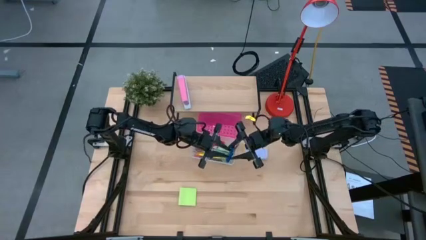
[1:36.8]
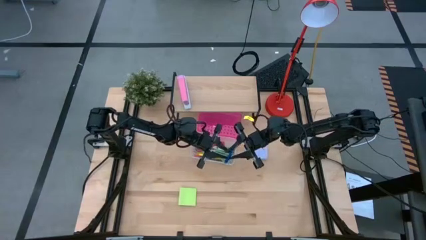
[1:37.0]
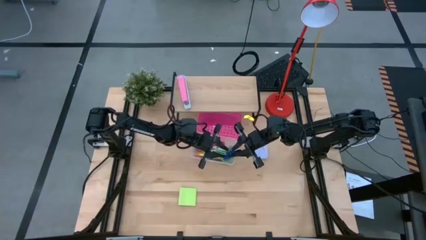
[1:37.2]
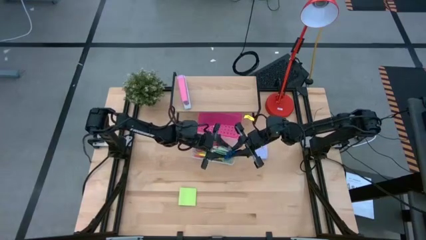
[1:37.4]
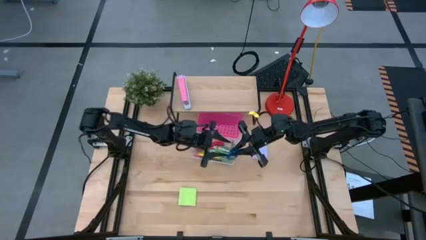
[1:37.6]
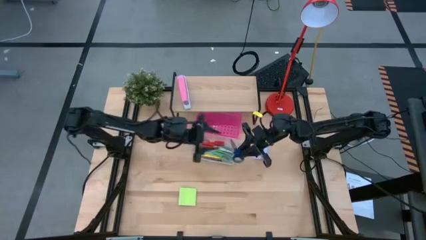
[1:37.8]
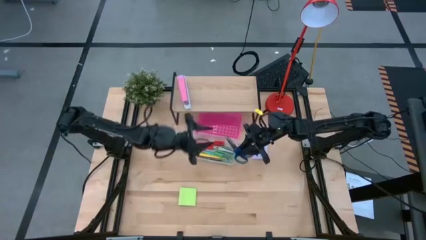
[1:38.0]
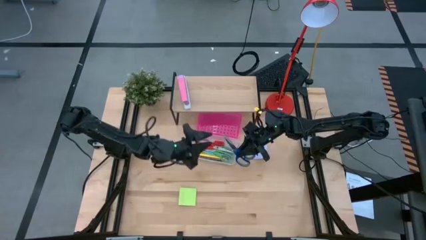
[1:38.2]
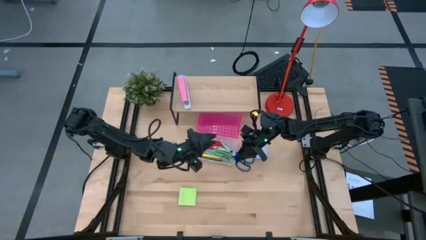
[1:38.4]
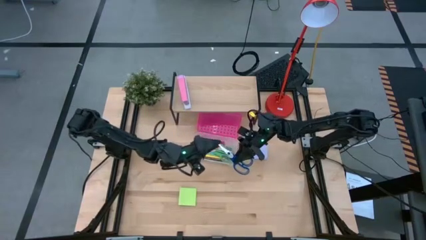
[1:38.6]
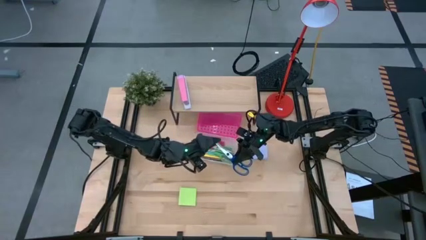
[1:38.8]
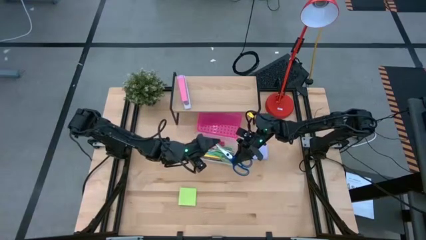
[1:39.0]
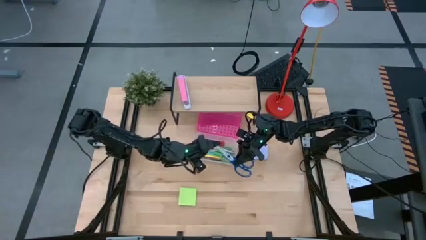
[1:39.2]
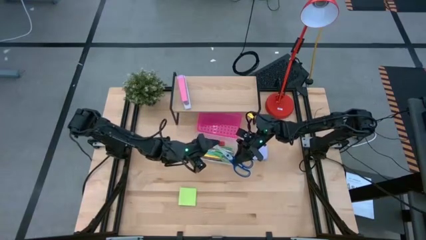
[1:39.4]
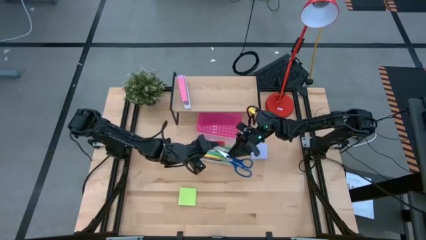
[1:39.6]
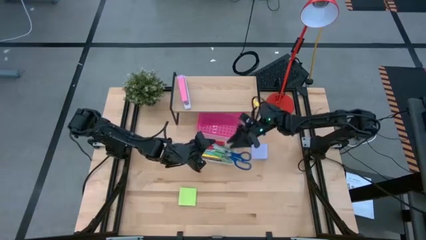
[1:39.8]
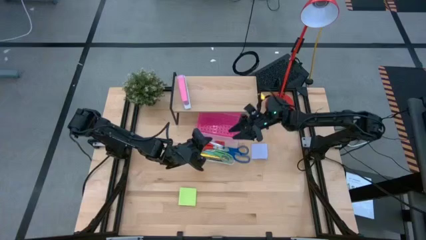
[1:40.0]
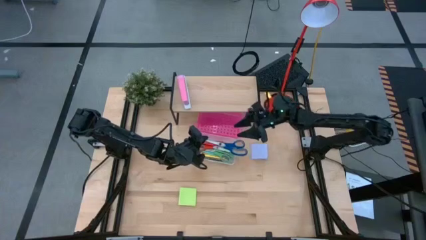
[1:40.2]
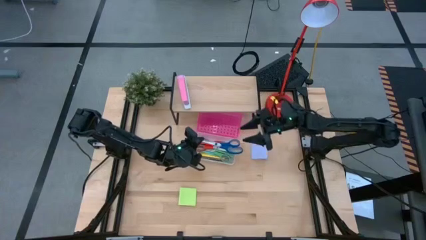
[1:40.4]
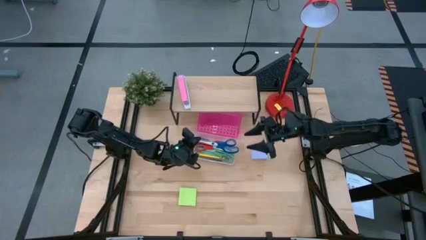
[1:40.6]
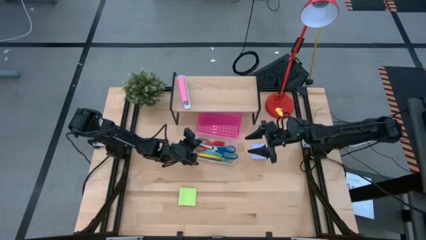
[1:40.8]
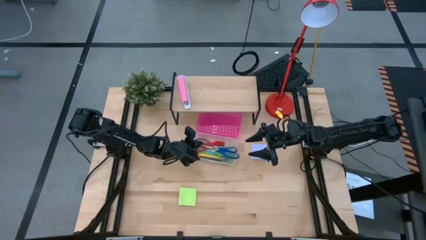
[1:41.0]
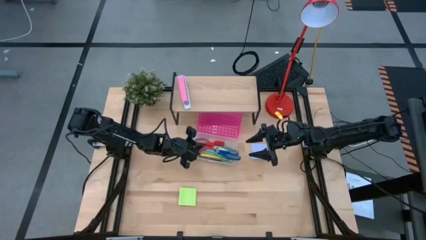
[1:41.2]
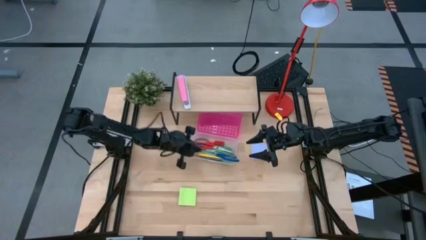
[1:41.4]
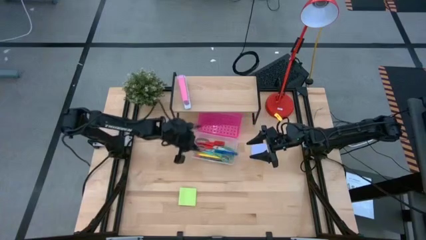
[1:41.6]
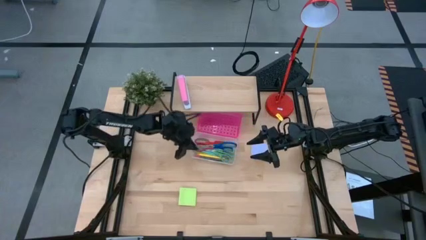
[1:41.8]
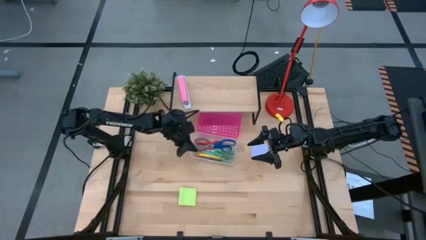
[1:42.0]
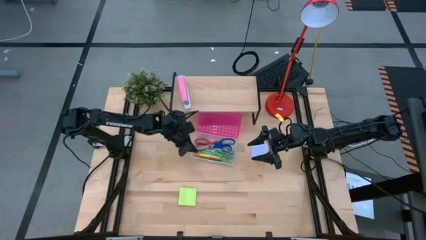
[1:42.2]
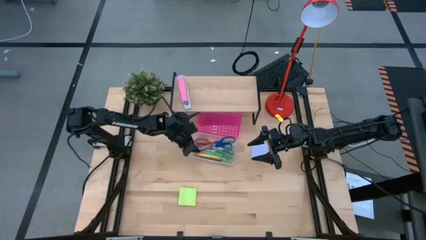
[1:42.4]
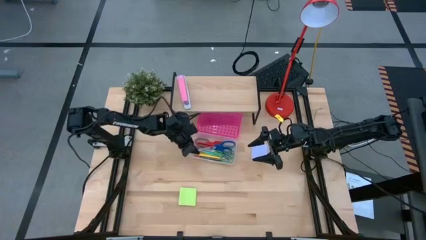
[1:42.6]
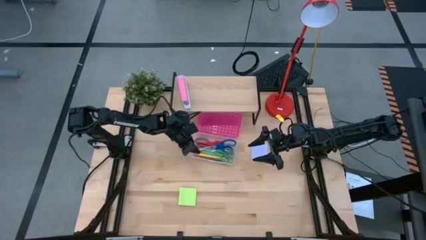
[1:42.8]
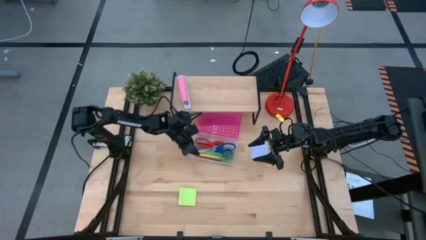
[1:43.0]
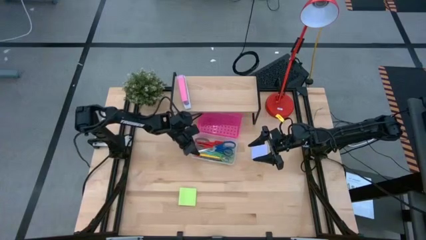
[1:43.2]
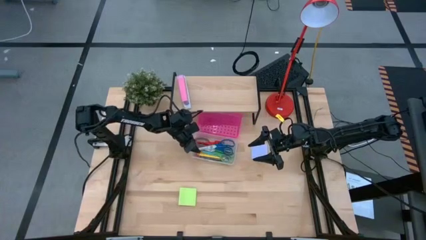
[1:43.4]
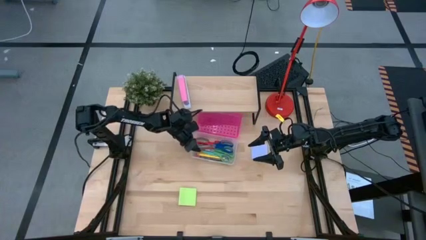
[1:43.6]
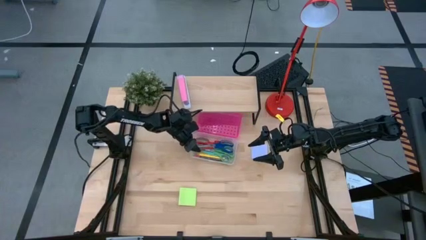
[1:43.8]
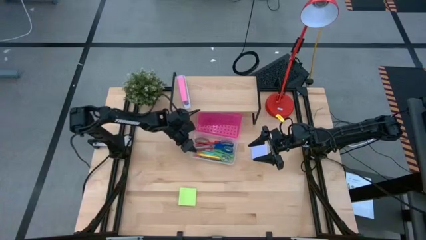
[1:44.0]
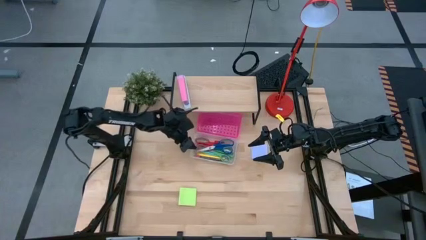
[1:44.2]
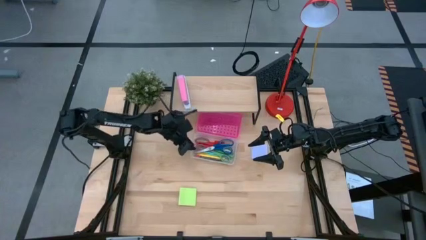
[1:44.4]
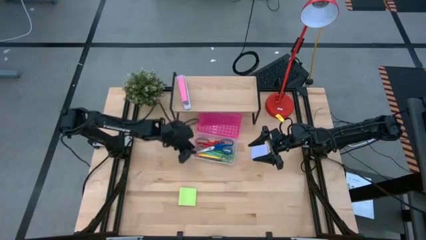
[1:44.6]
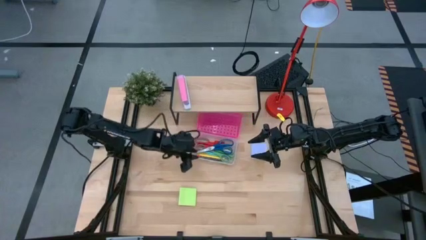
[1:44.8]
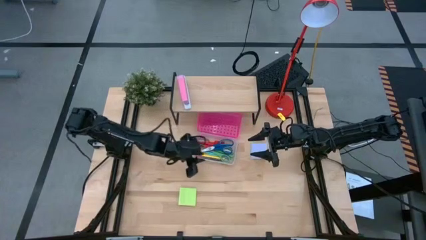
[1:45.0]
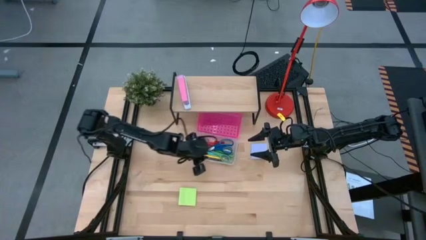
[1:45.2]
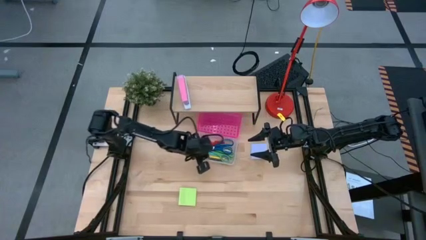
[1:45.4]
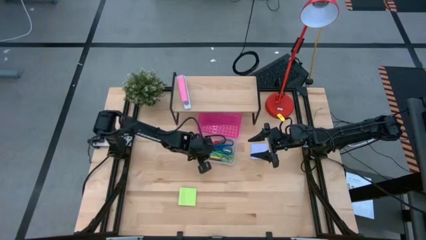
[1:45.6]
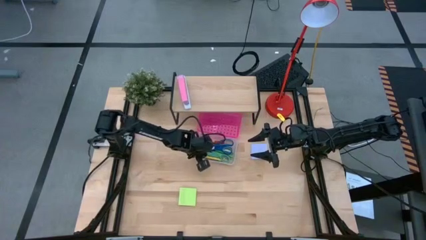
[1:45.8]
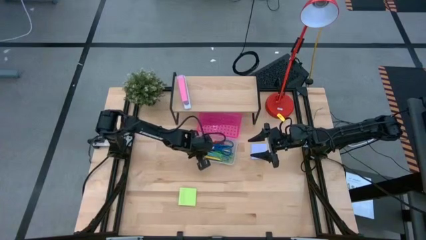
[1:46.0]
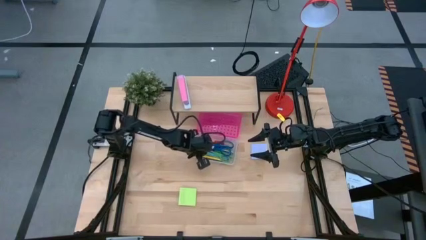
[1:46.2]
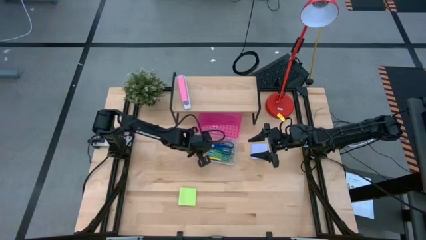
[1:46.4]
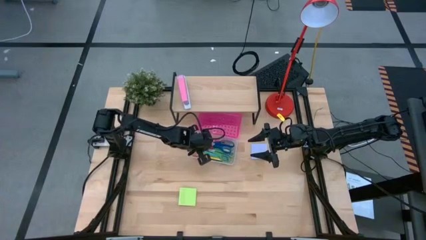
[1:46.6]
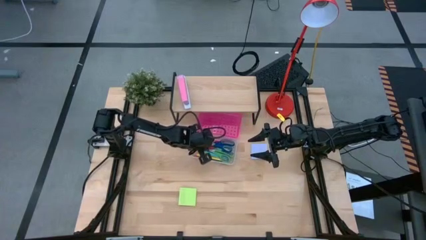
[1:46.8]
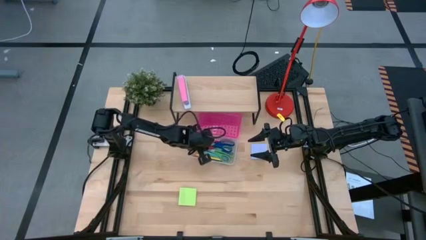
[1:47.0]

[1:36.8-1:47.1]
Task: Pack school essentials
Put the blue scissors into the supply box

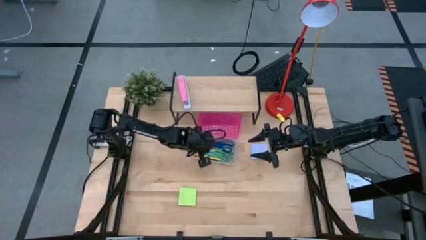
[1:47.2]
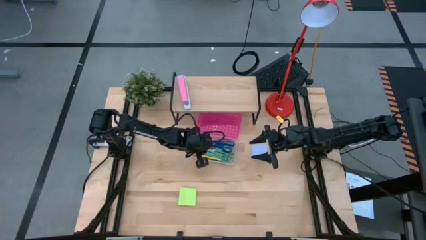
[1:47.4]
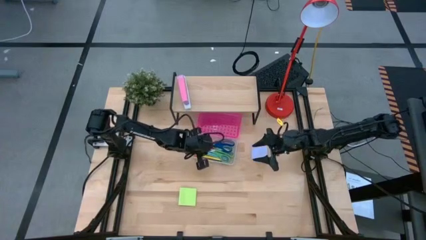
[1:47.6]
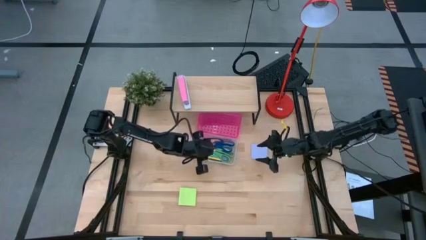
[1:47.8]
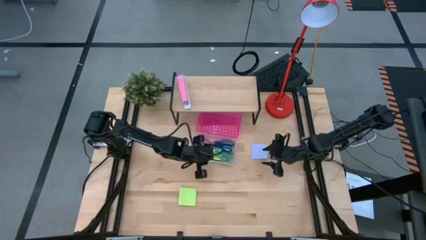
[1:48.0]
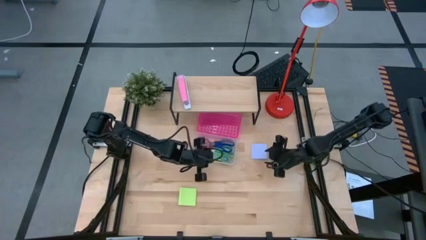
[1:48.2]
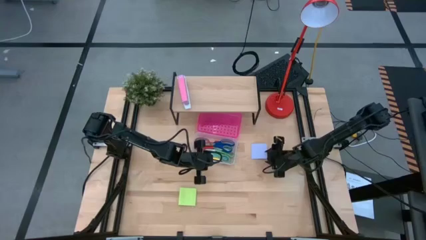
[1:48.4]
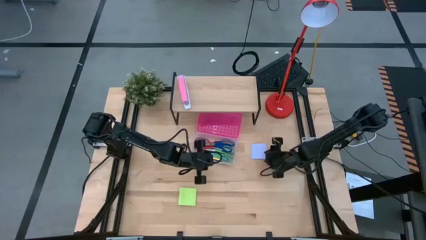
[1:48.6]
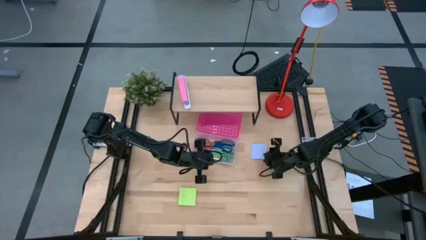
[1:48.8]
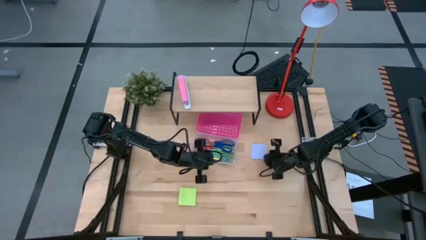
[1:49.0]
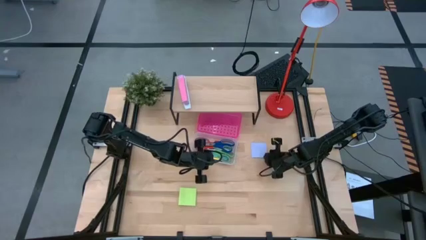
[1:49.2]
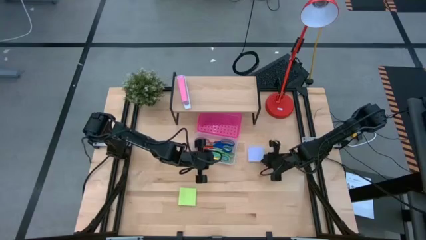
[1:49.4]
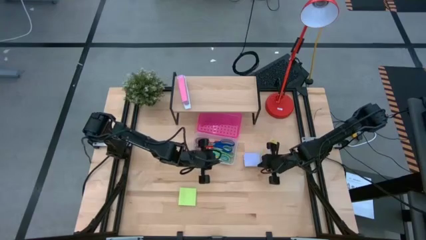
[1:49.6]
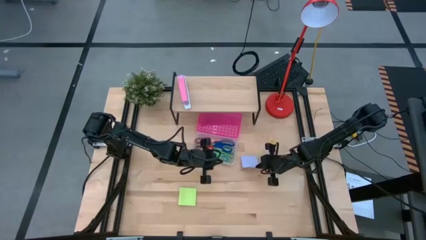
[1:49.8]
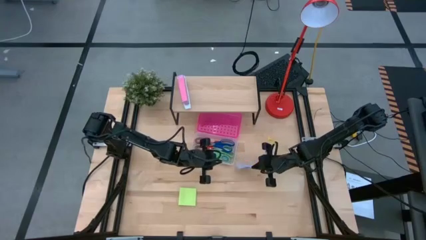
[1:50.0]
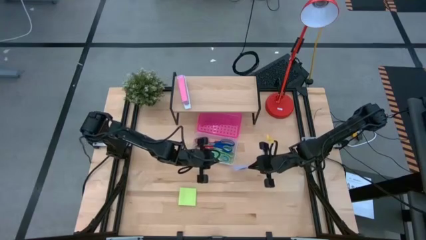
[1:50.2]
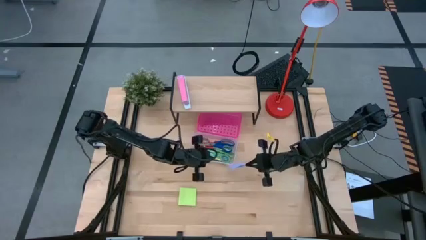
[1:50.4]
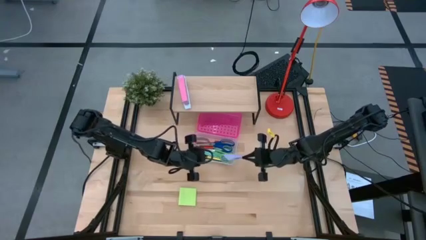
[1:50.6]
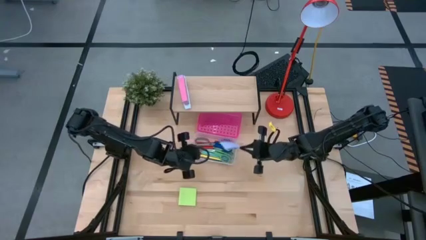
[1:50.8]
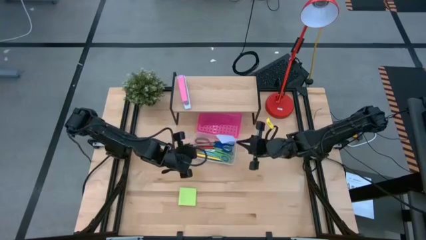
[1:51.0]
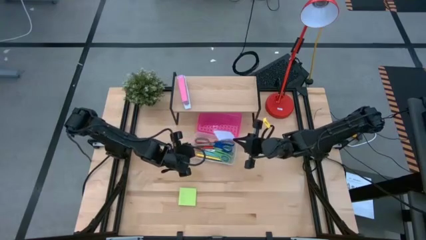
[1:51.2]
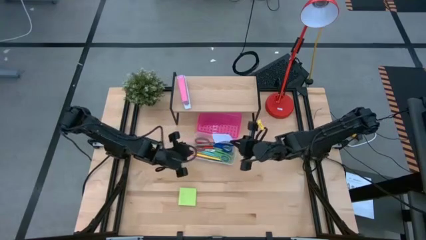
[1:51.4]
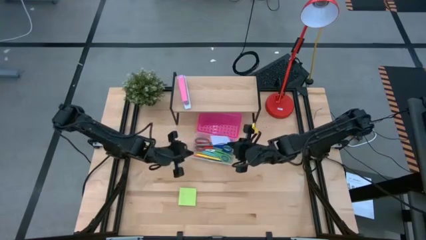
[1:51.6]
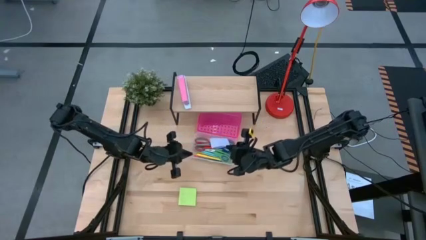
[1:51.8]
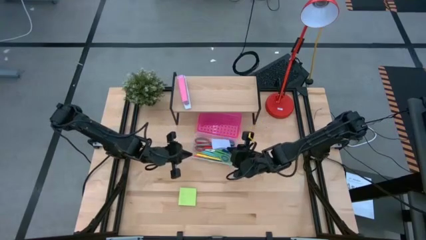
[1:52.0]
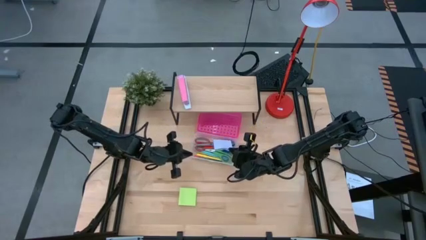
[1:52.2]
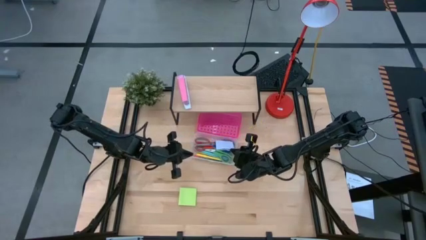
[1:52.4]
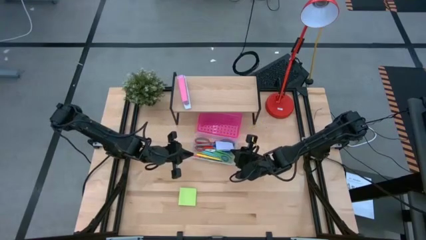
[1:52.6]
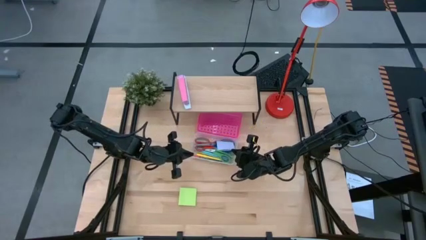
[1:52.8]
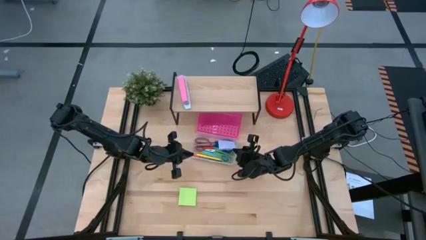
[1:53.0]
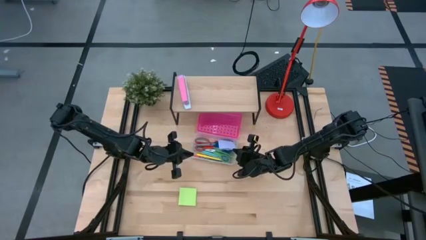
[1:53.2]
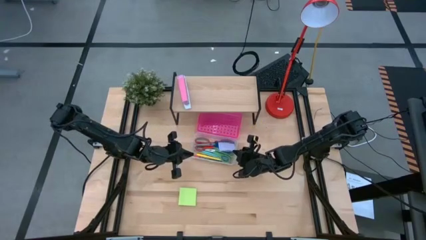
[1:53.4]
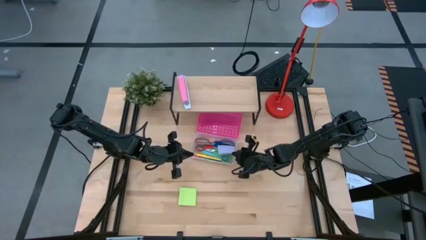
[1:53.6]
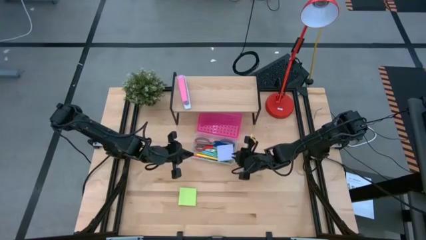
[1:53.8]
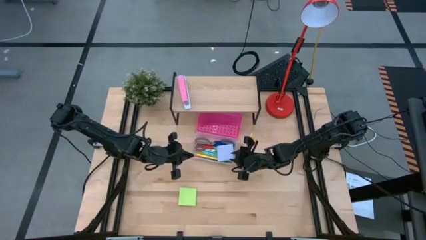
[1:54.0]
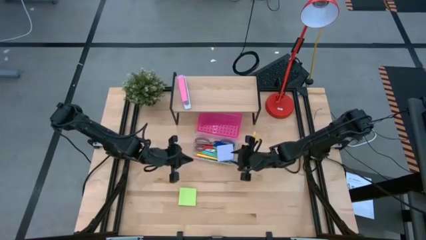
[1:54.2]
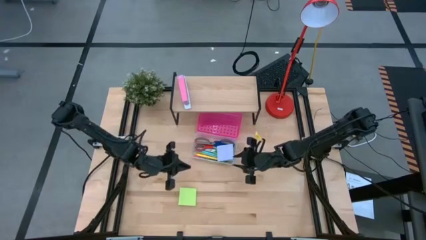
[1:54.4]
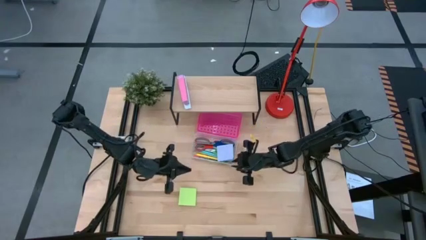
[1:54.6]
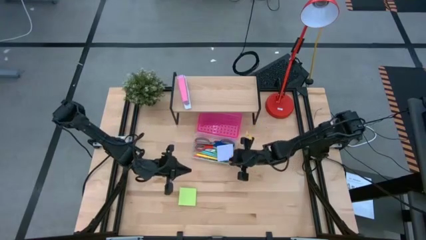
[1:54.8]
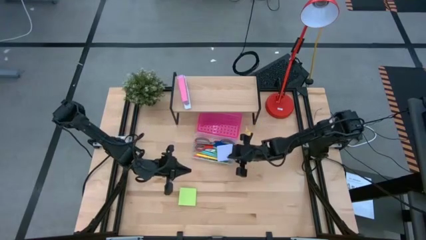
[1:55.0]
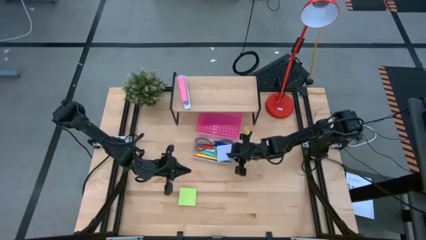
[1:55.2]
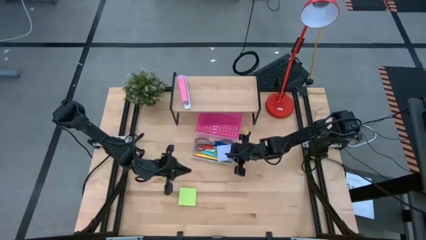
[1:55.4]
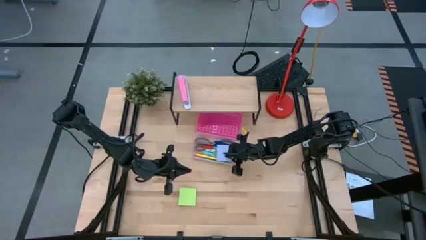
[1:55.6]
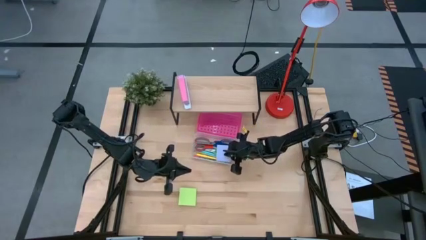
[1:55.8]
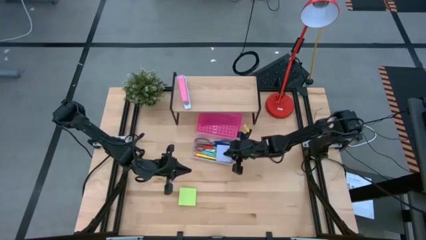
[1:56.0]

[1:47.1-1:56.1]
Put the purple sticky notes into the supply box
